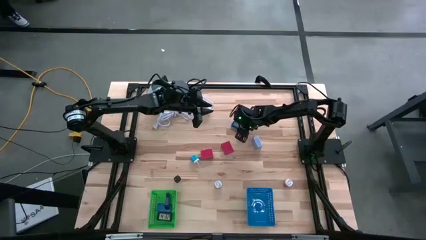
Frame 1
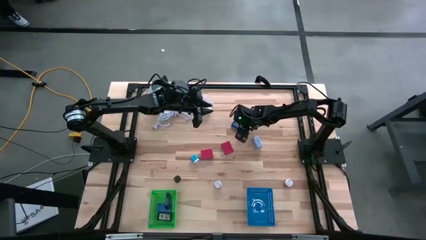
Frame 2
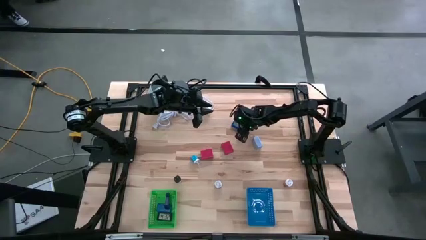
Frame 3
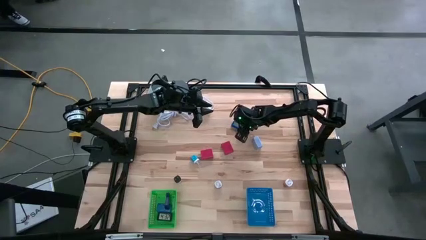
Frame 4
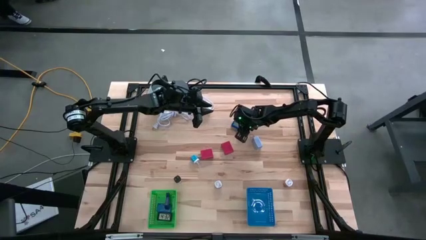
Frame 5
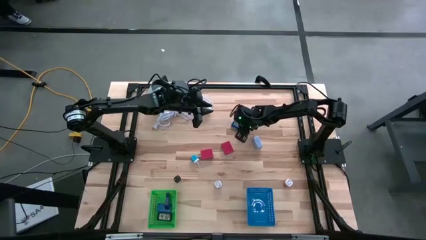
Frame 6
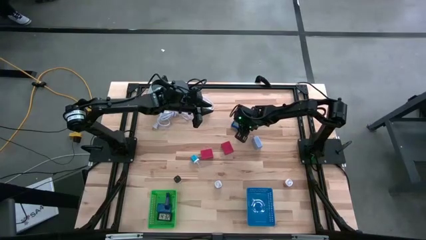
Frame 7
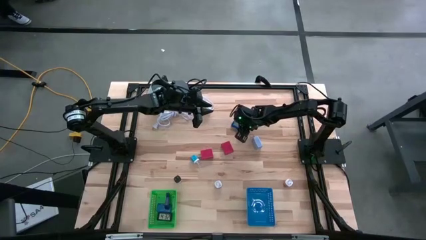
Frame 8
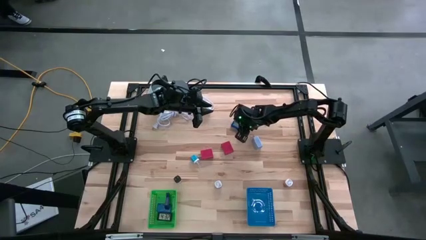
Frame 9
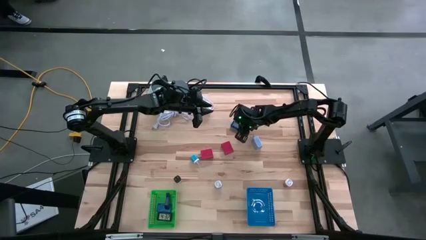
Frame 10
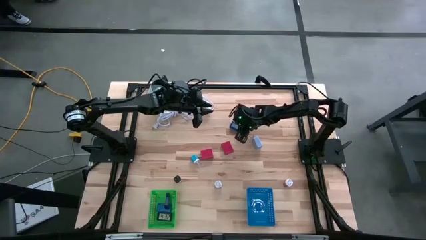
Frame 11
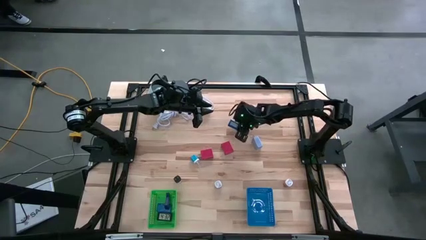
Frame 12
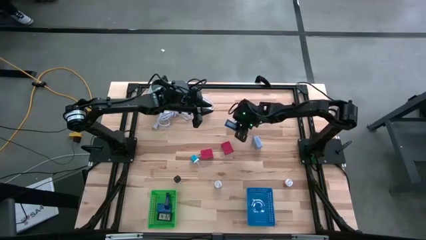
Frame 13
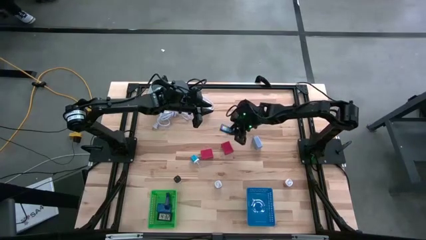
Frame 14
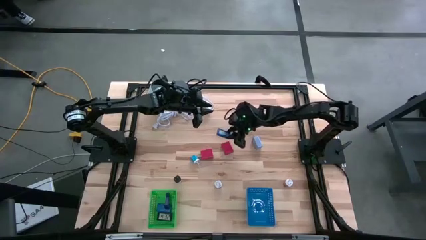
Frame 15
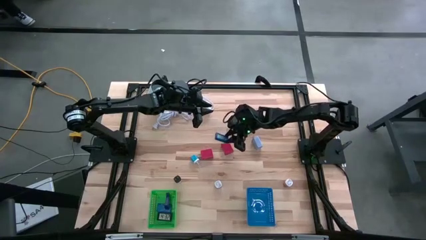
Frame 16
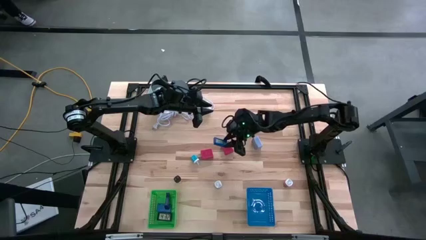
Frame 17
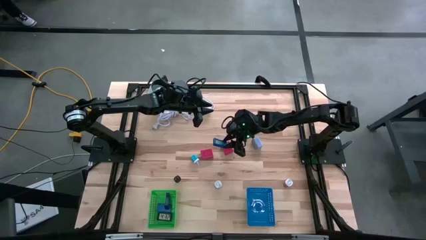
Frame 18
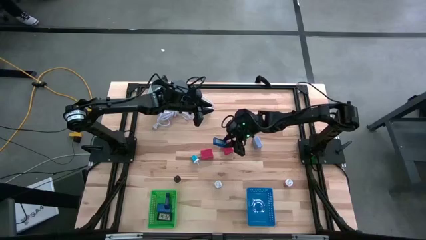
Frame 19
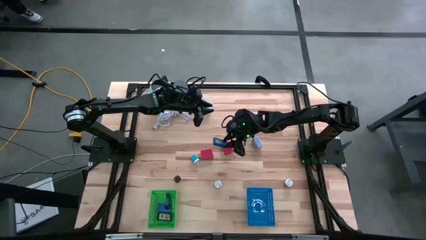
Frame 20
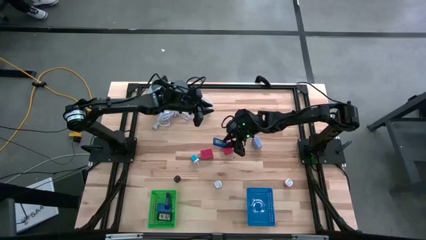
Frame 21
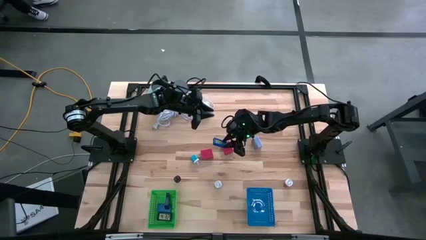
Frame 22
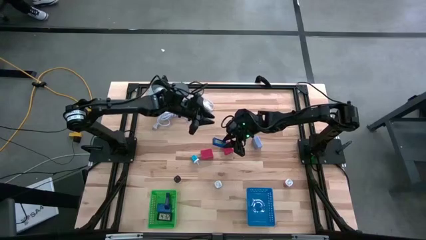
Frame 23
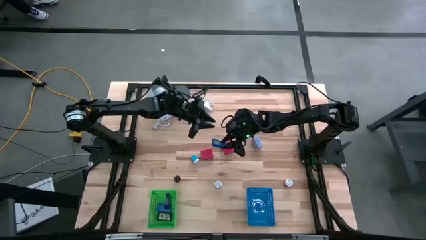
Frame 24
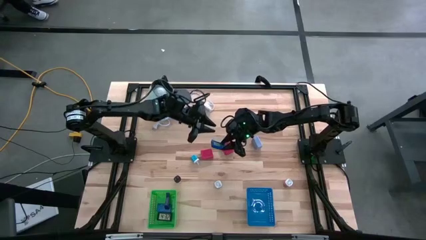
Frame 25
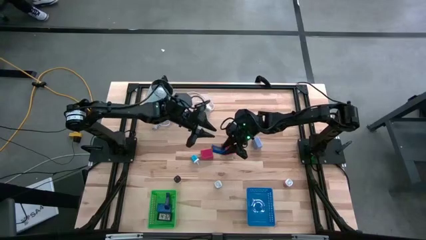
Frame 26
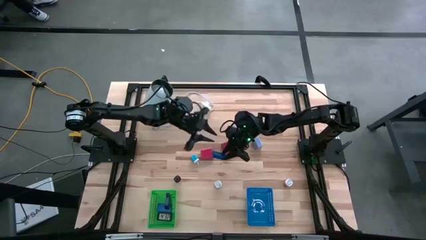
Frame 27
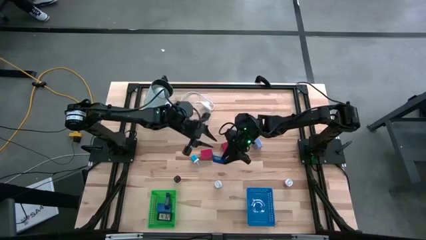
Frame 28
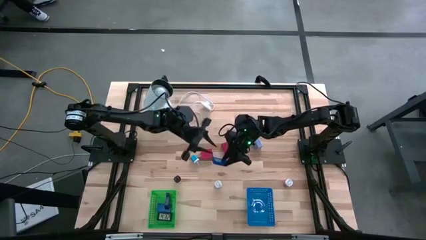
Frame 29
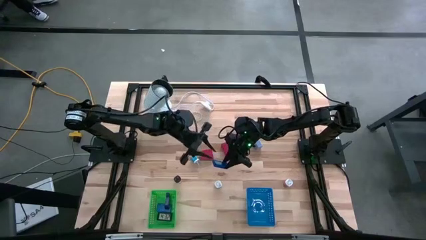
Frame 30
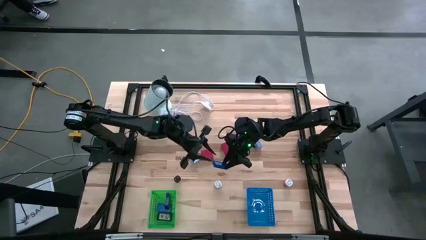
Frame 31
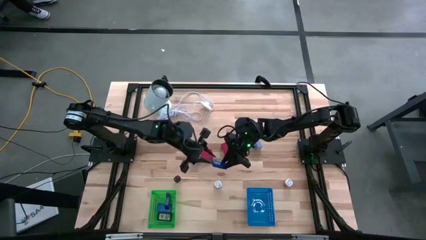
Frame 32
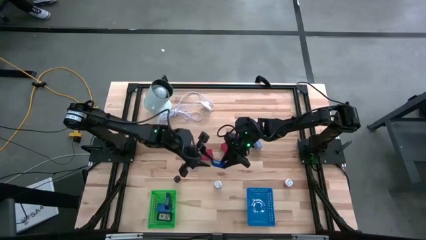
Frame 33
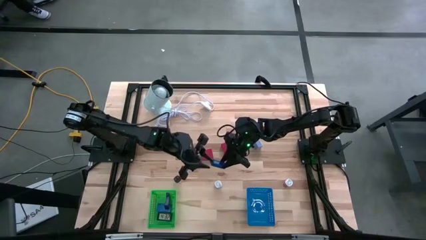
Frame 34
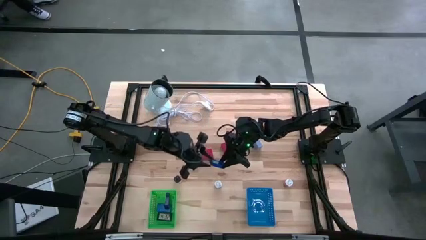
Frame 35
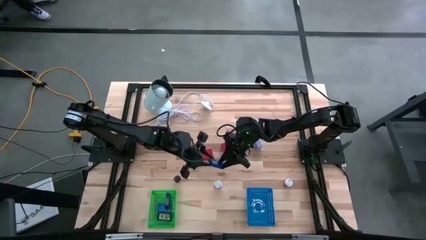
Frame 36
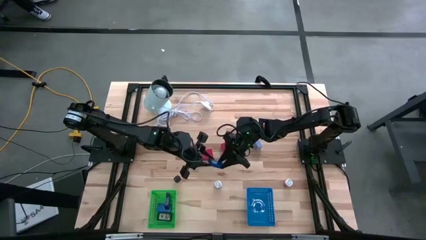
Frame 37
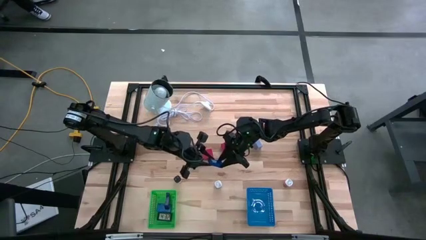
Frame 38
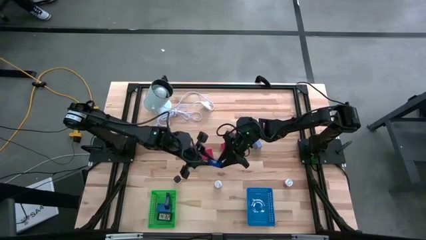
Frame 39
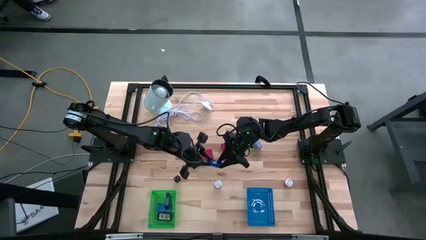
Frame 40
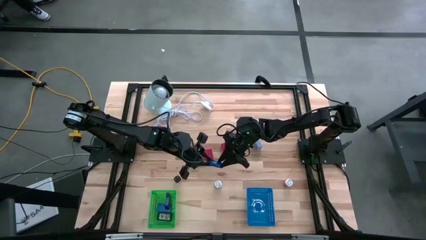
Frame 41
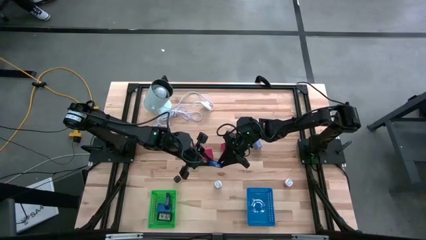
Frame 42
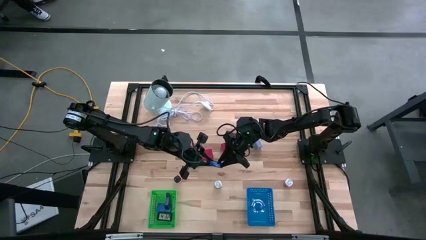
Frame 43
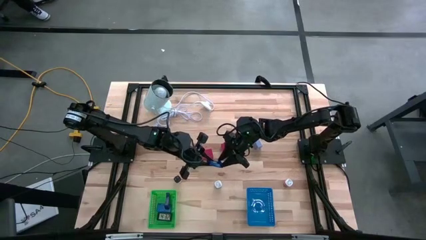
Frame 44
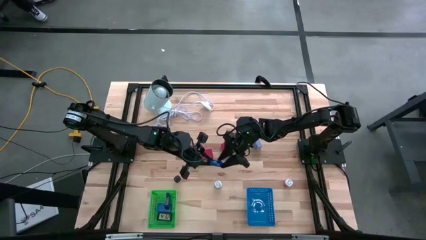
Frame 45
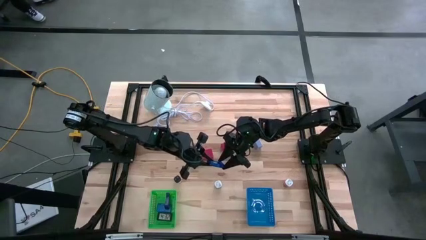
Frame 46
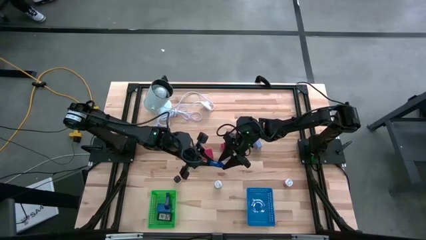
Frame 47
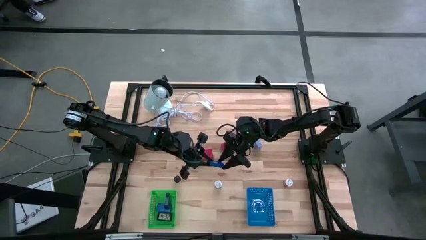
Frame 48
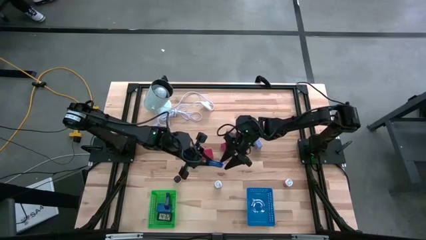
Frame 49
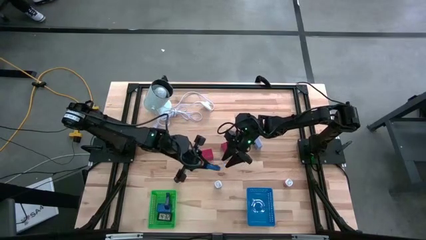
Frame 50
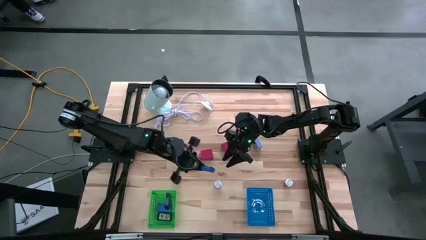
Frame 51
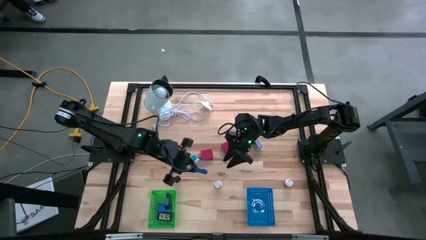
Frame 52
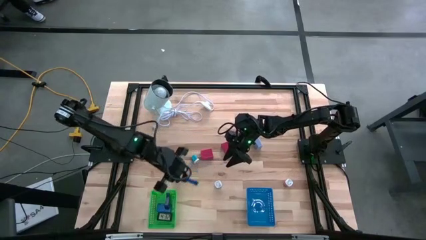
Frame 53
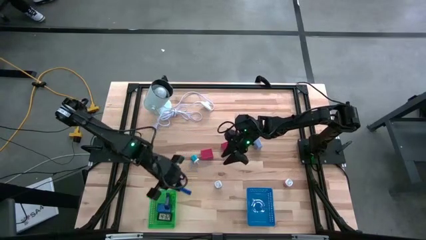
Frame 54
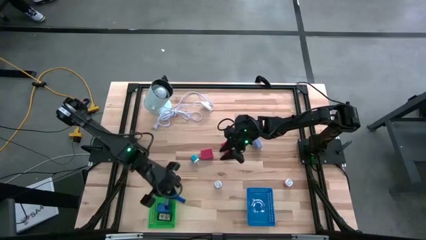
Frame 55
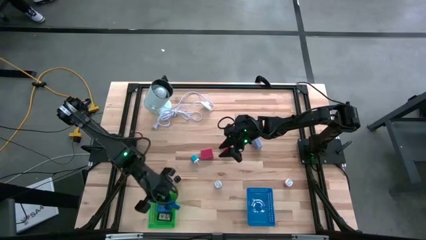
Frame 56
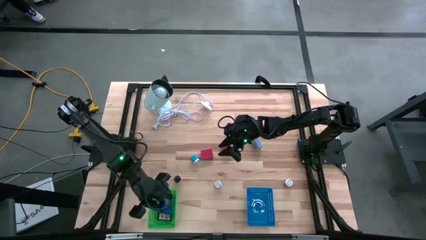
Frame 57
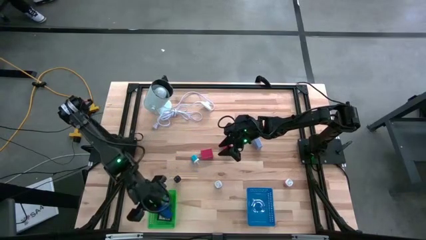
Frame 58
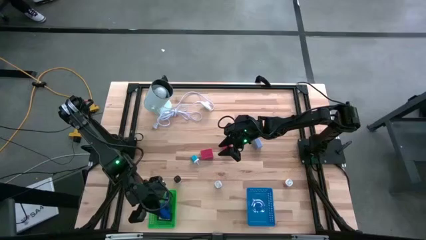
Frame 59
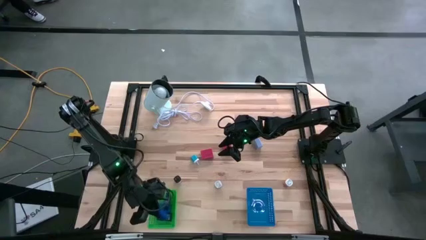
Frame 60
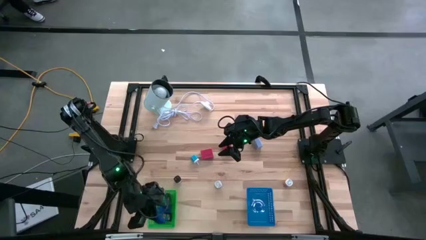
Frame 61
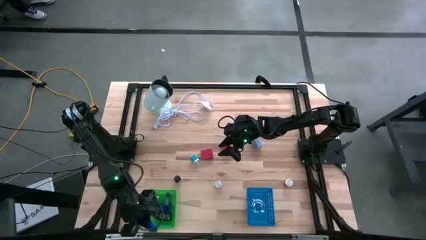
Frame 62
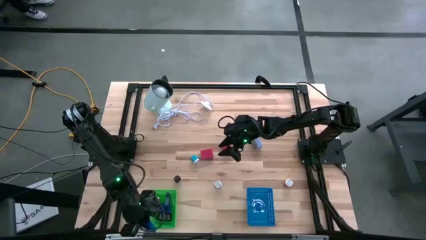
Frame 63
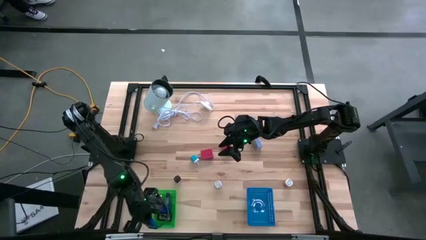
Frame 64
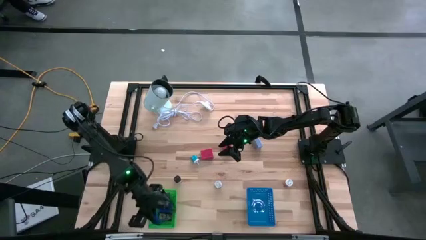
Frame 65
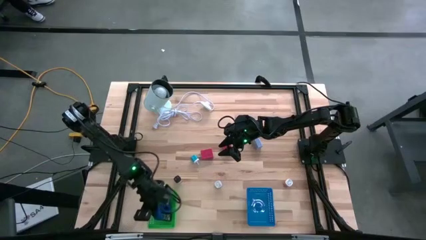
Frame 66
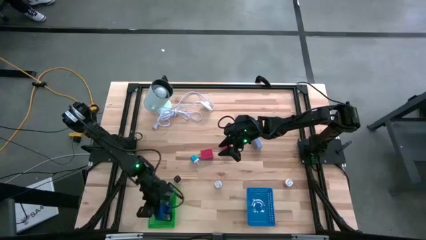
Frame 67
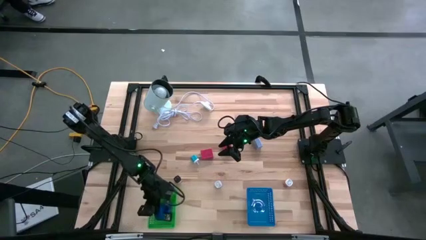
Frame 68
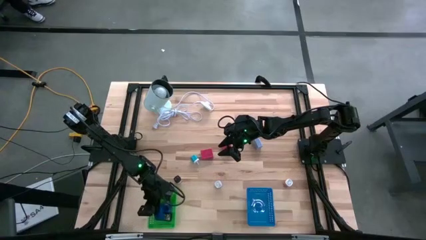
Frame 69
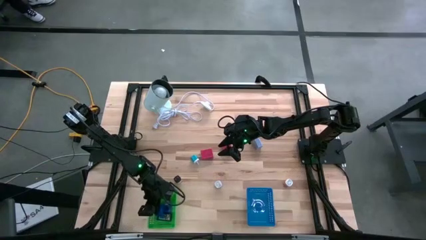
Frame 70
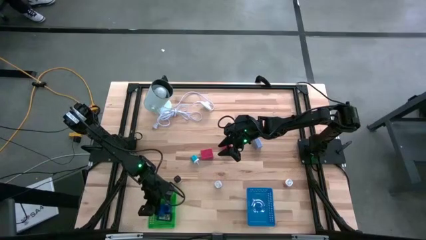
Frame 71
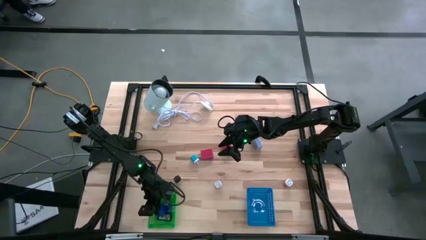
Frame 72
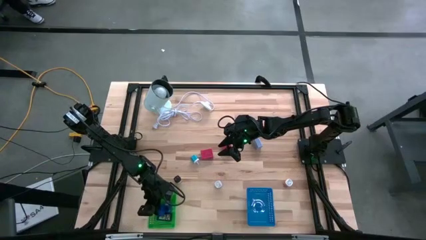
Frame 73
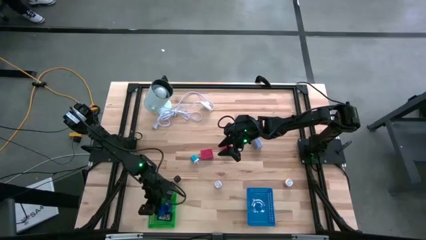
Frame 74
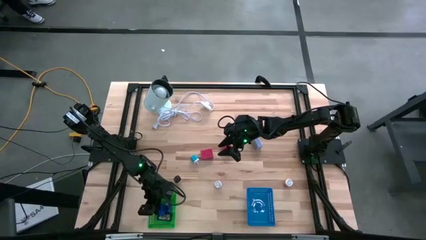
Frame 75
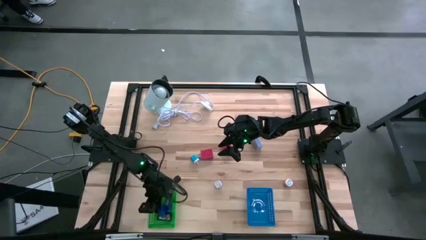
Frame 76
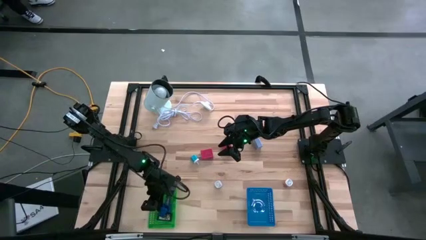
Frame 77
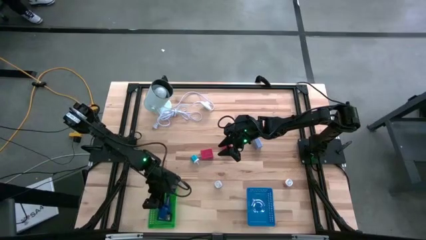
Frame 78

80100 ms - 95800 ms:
Task: Pick & Place Office items
Put the blue digital clock into the green bin

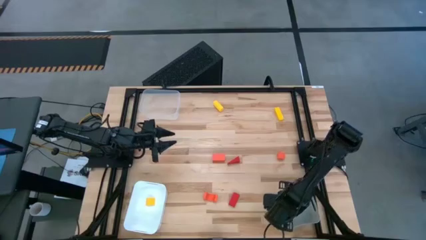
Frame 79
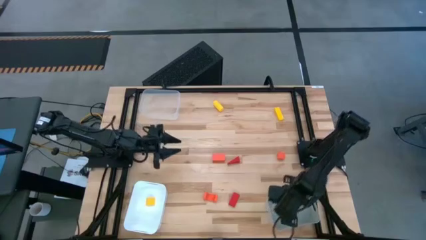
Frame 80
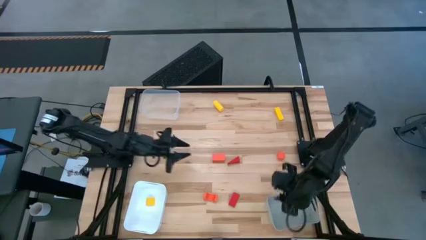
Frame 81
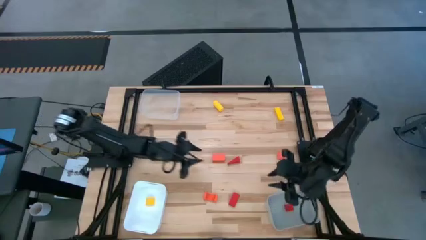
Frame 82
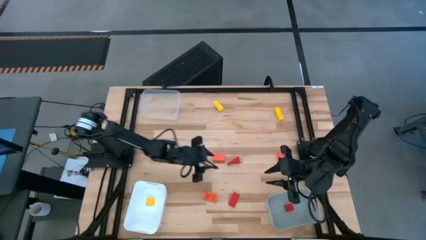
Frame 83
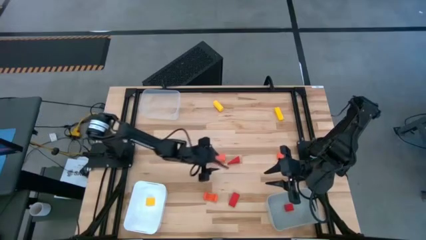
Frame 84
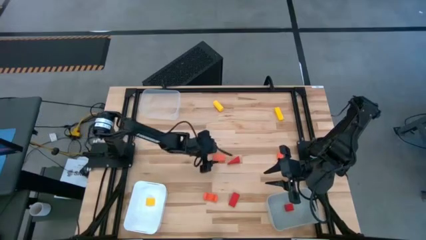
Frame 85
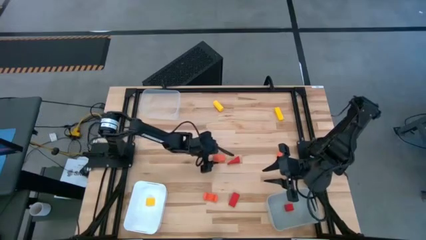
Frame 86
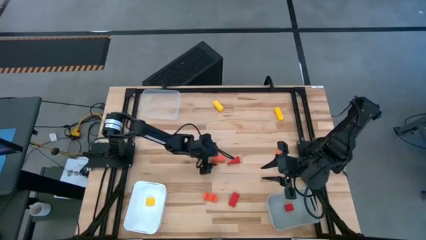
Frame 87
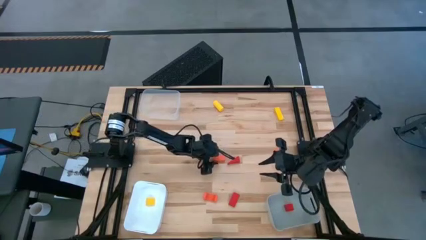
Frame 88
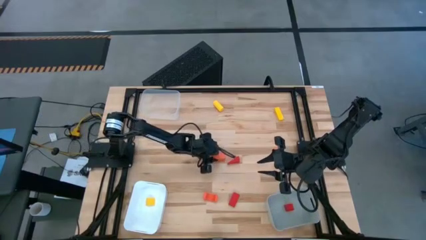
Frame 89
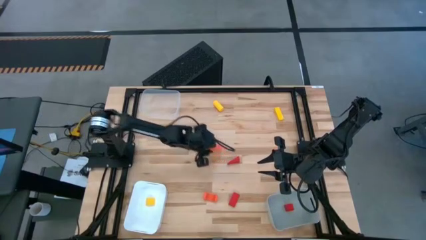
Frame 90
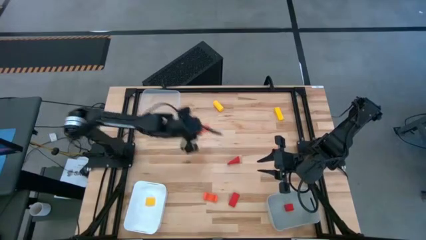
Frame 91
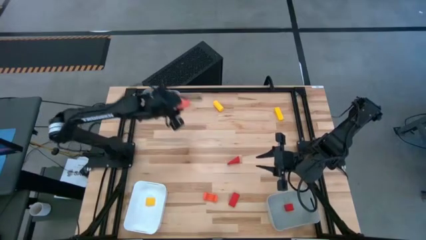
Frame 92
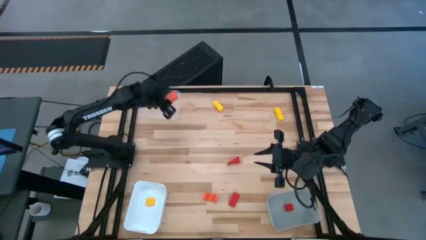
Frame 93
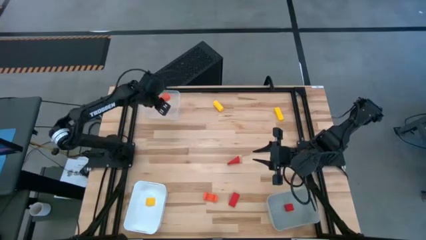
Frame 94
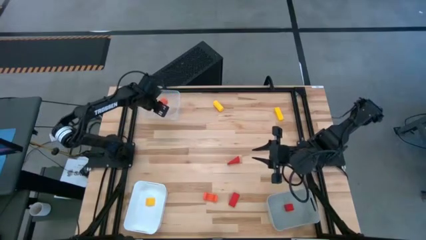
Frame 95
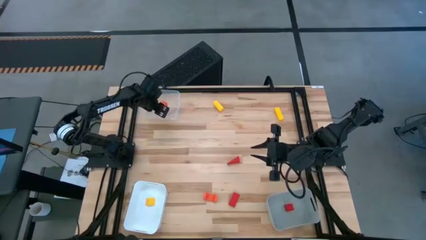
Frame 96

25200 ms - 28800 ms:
Task: Sort & place blocks by color
Put the top left orange block into the transparent bin
